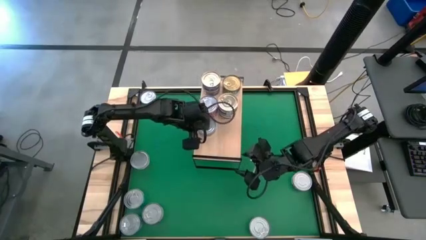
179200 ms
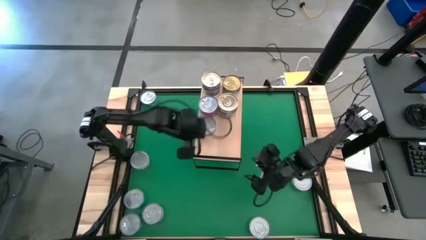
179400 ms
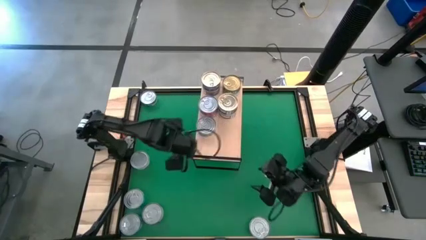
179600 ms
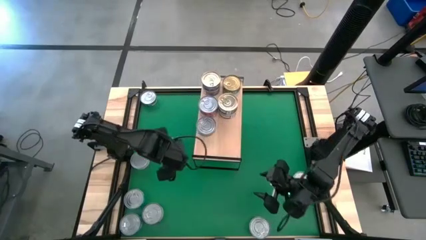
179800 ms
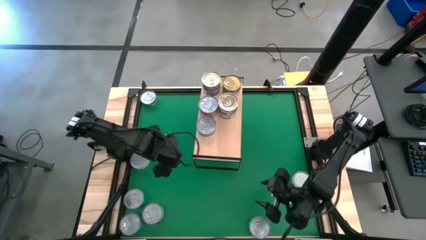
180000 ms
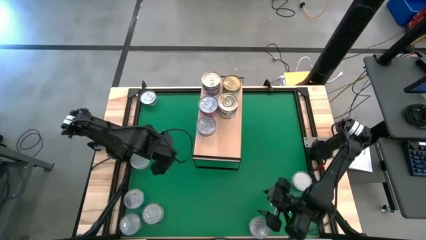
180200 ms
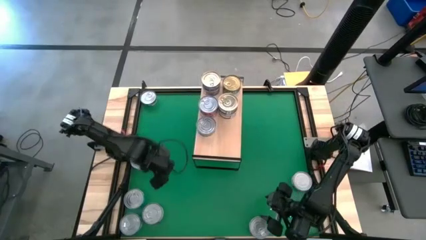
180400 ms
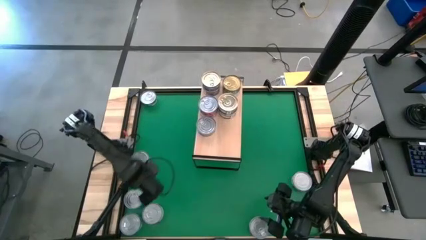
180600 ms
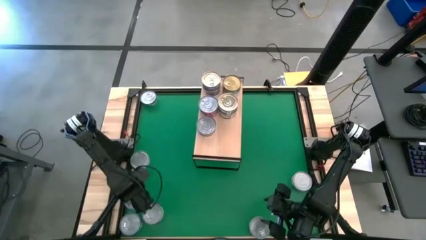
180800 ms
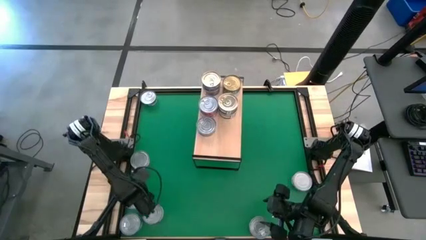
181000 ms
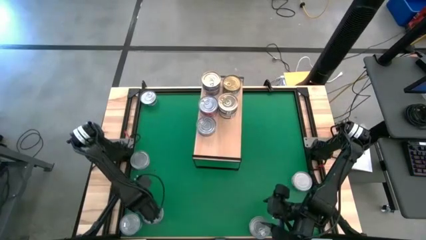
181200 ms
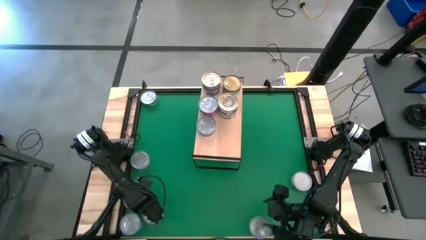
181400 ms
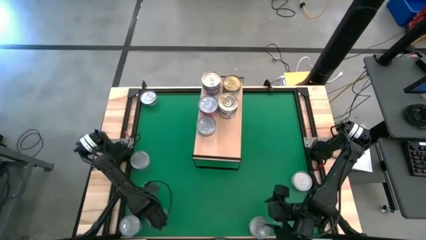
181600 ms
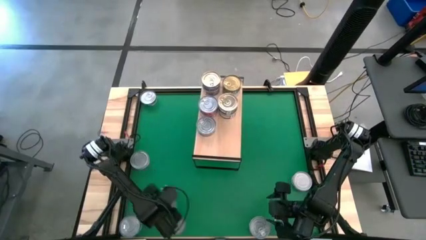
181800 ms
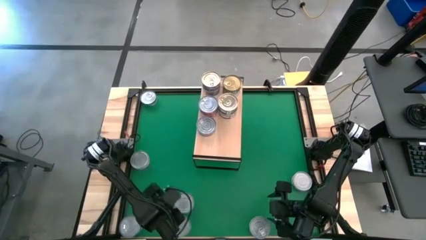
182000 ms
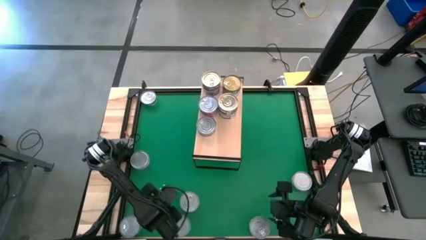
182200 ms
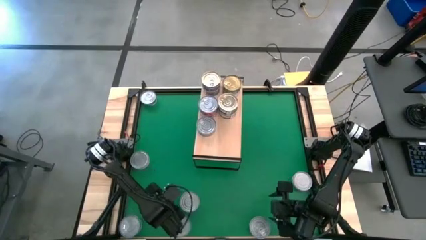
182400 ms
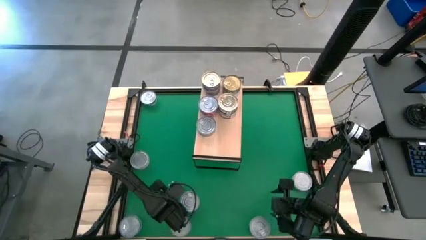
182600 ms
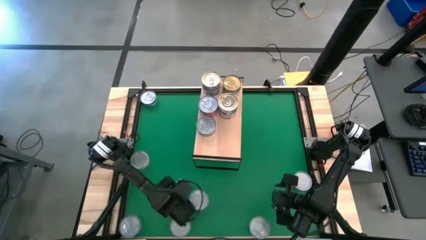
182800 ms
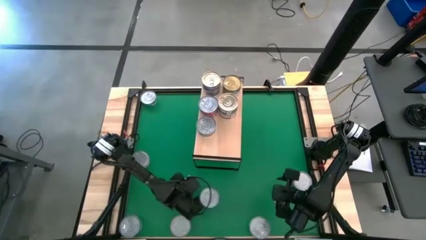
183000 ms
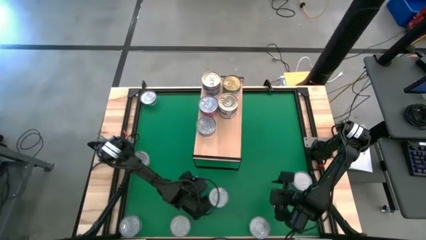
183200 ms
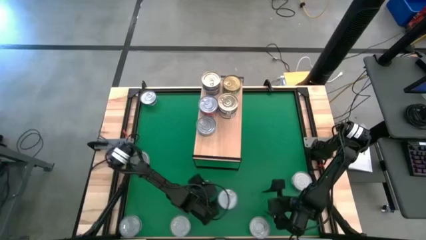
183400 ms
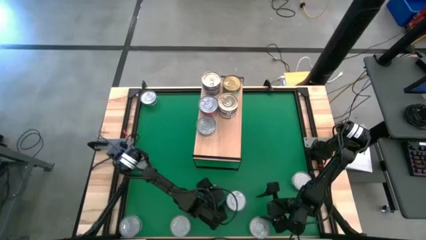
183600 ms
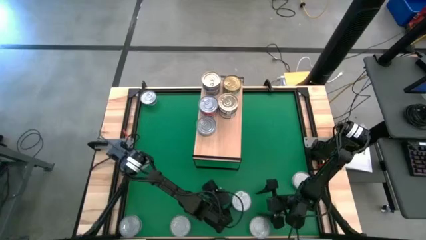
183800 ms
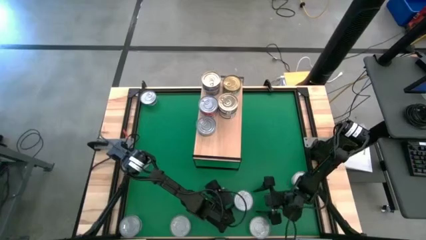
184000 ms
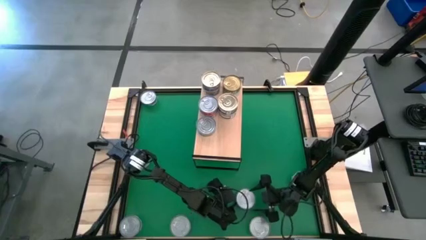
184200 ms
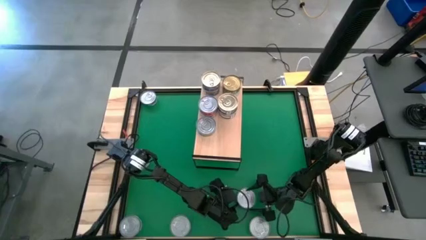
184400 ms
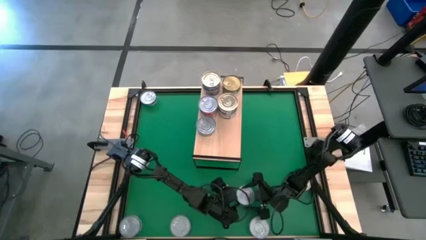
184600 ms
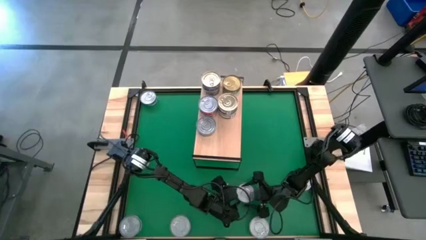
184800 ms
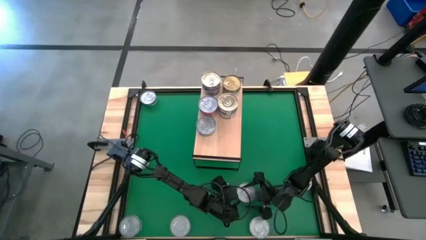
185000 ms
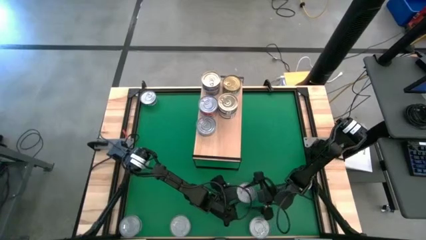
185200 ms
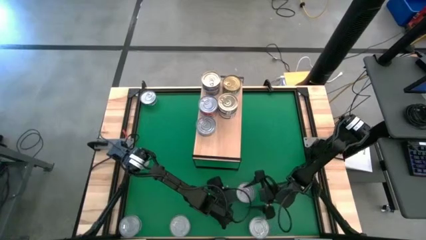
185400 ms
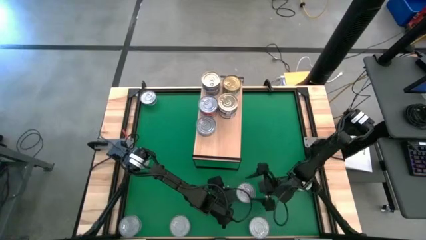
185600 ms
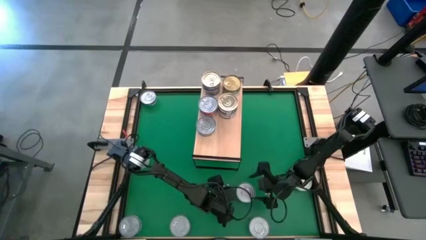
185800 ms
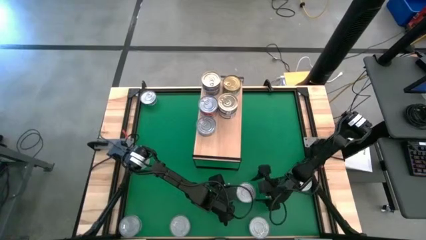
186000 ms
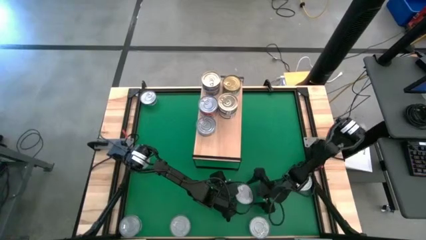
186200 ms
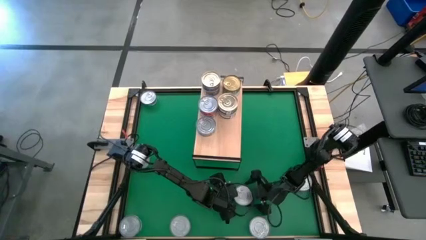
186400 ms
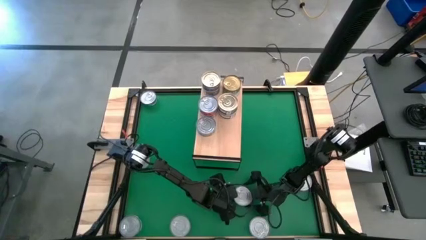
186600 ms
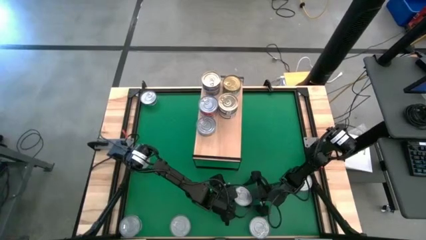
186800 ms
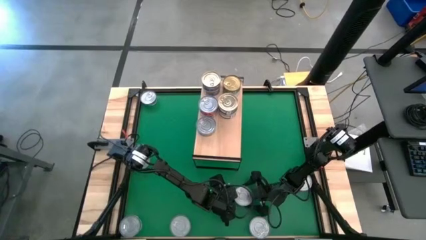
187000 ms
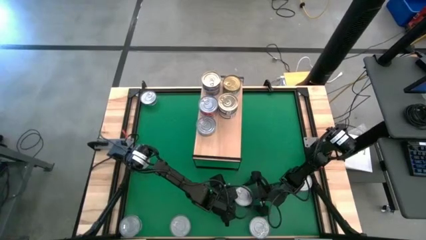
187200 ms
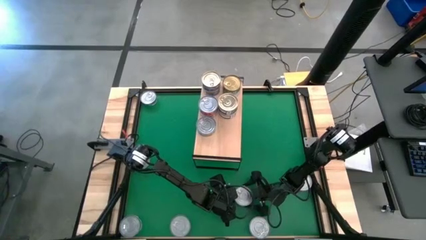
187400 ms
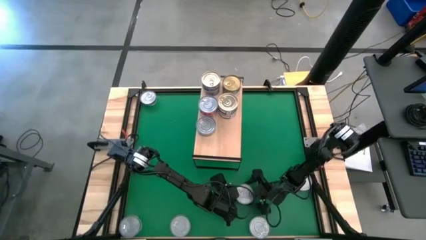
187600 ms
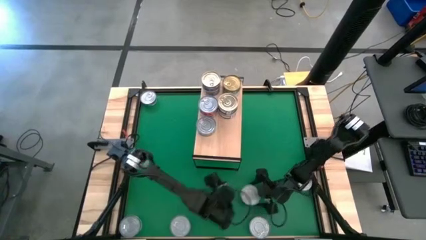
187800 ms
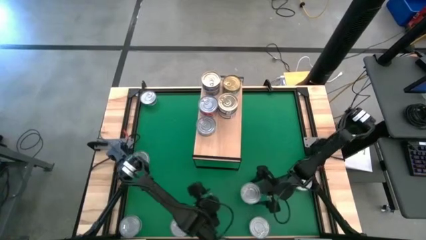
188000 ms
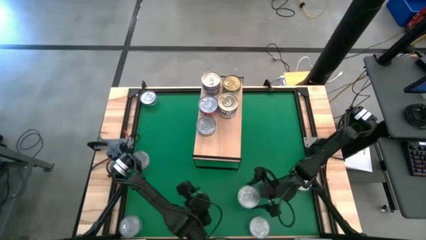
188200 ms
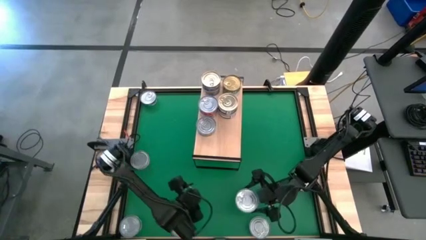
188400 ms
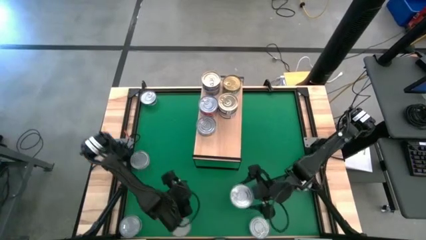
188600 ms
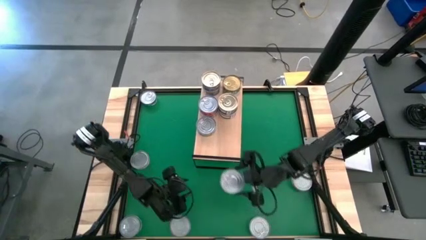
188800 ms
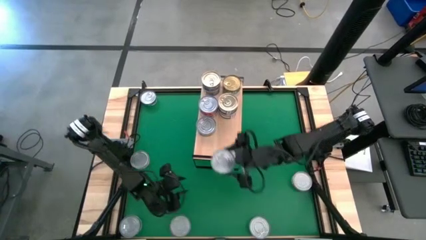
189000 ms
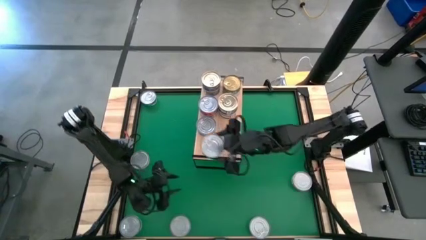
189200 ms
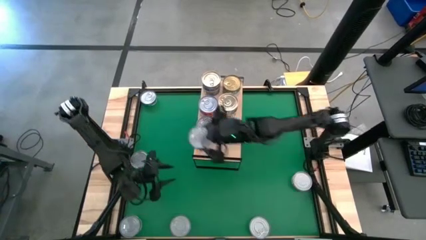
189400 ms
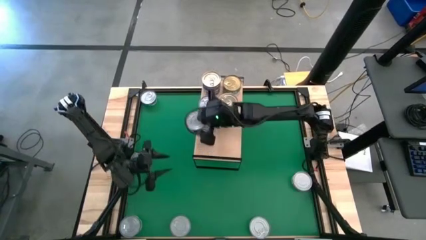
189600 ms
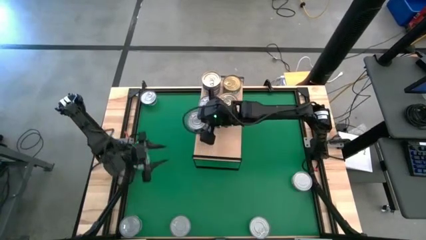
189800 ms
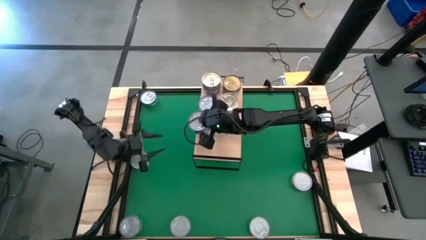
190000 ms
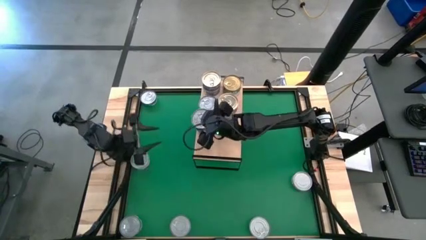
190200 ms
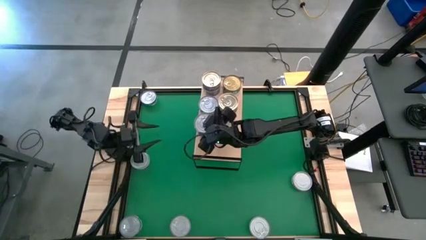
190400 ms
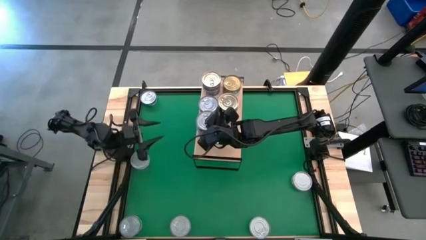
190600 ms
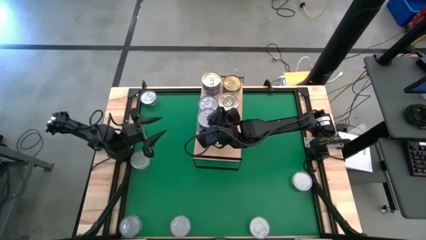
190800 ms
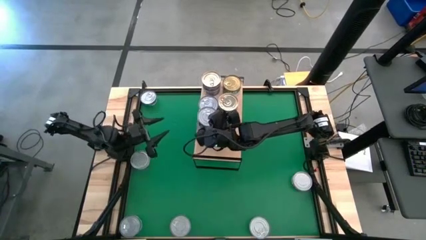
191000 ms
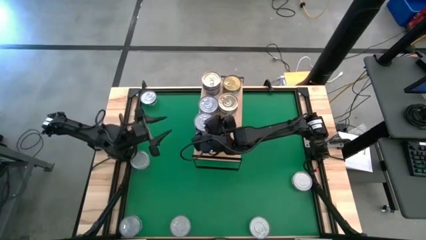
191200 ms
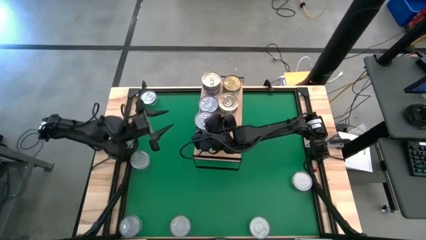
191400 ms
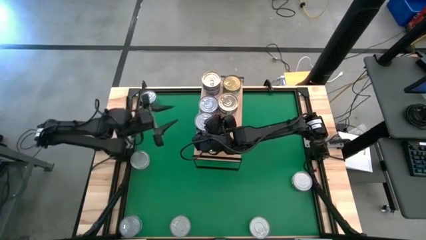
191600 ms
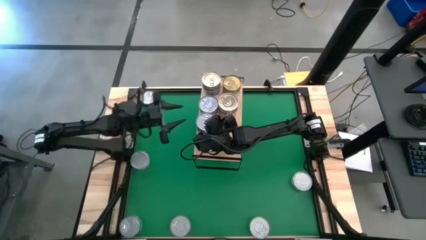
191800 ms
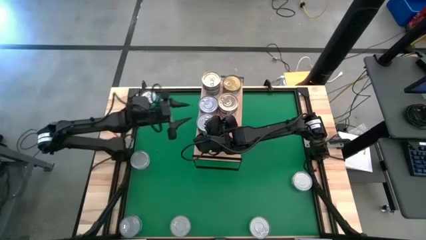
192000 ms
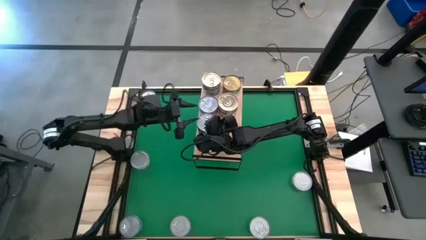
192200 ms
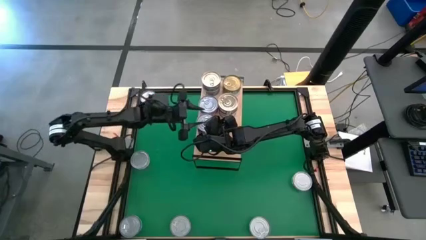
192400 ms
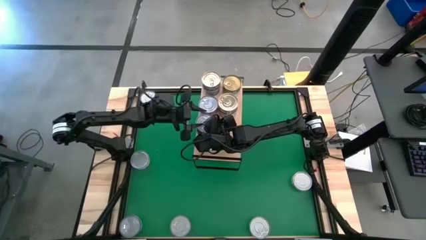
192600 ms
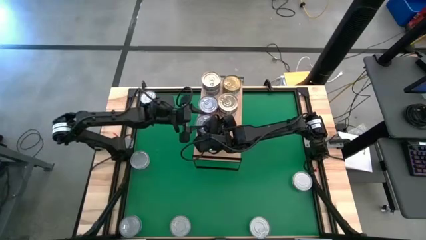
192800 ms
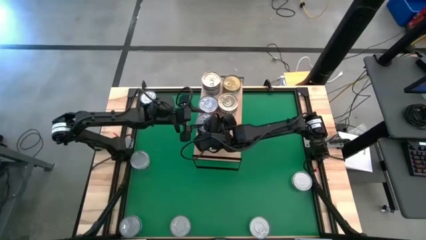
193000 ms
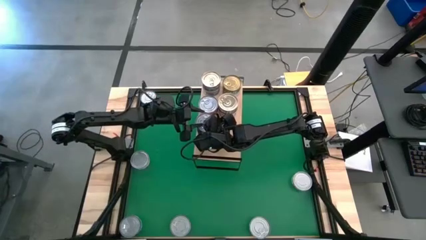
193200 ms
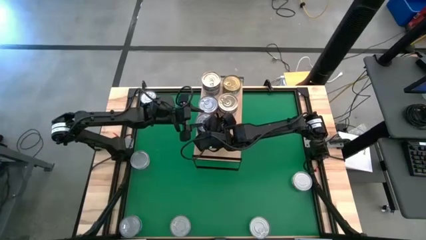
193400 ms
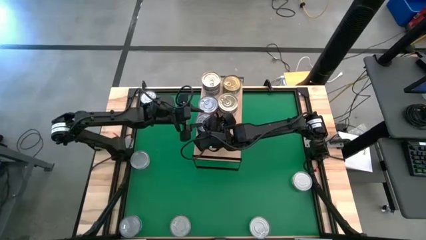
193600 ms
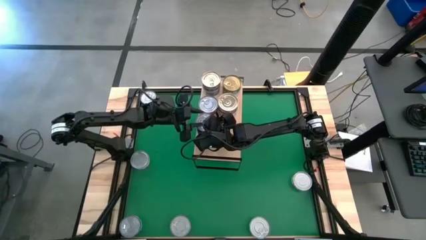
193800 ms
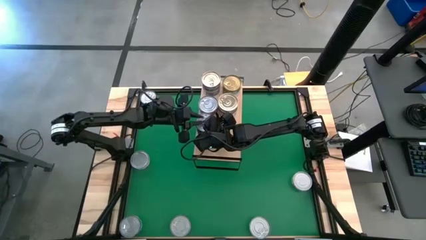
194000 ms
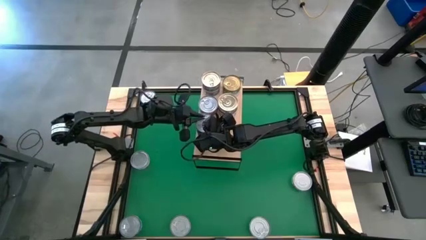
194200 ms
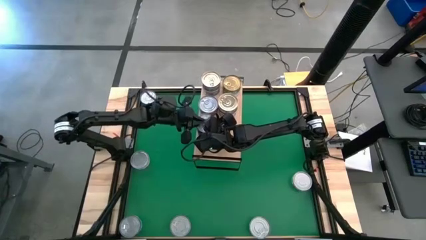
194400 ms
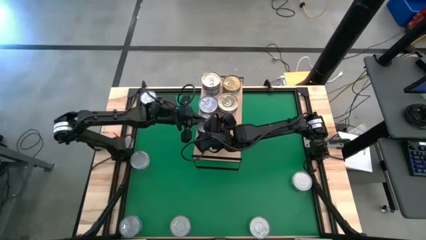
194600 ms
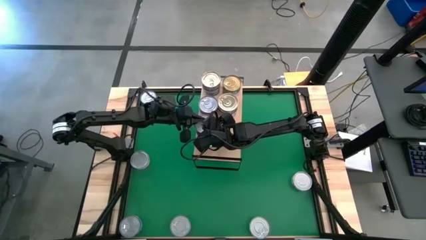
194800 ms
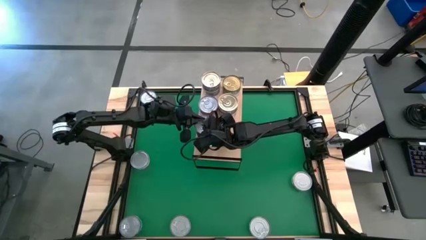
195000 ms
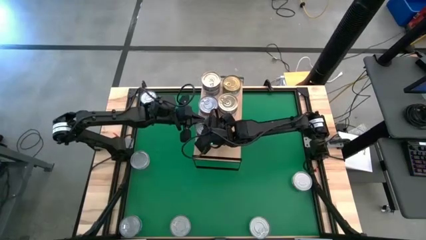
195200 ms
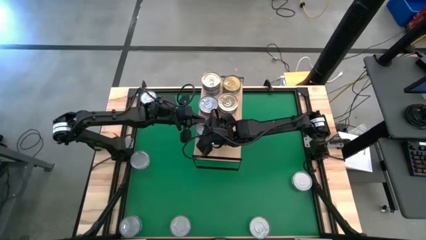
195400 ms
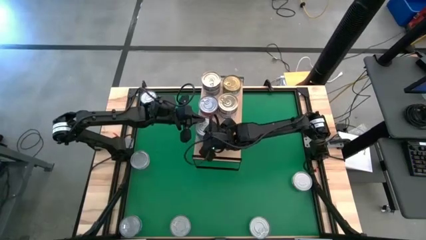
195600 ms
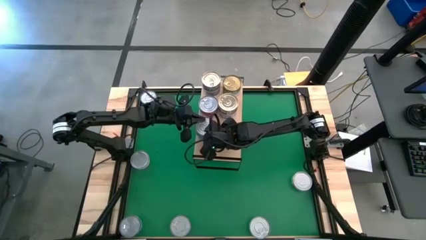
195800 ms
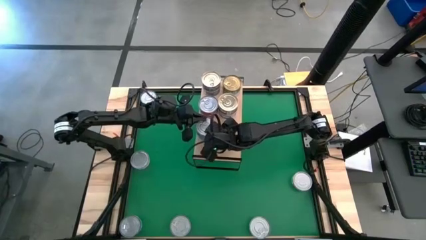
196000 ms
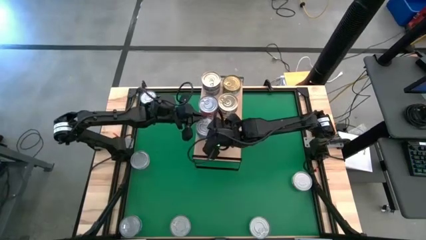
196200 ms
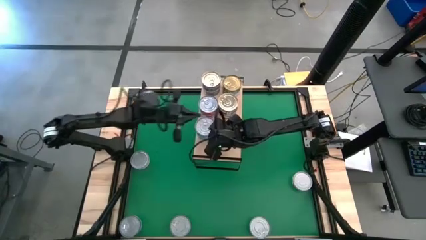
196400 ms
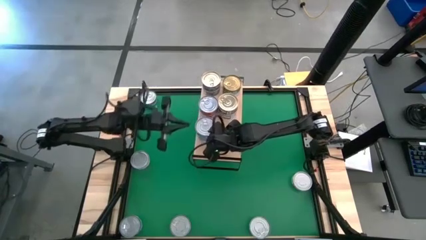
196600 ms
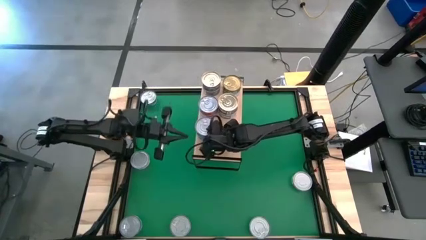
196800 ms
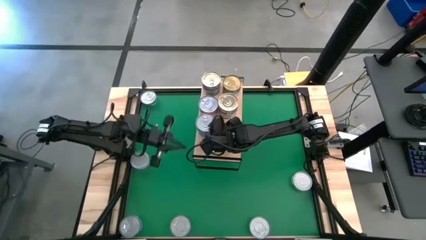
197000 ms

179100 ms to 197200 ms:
Task: Stack canned seafood by type on shelf
Stack the yellow blue tuna can on top of the other yellow blue tuna can on the shelf
